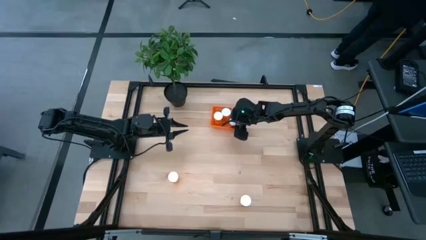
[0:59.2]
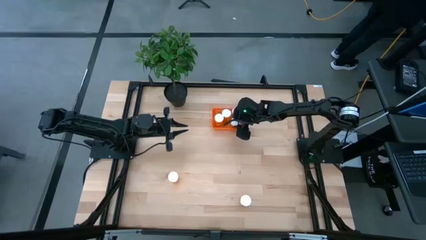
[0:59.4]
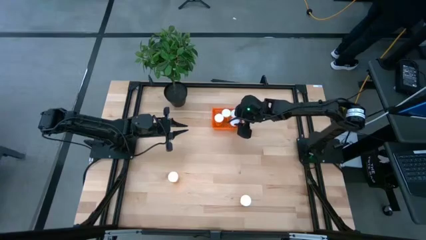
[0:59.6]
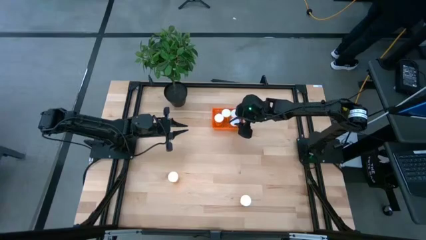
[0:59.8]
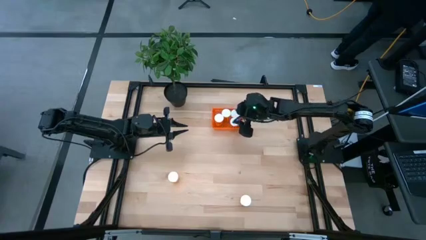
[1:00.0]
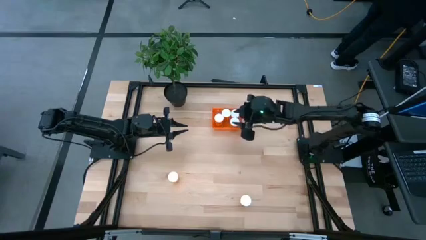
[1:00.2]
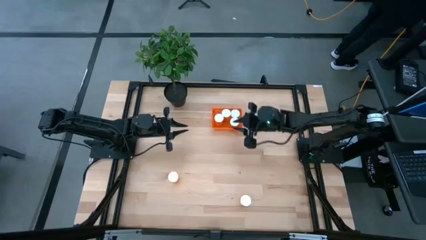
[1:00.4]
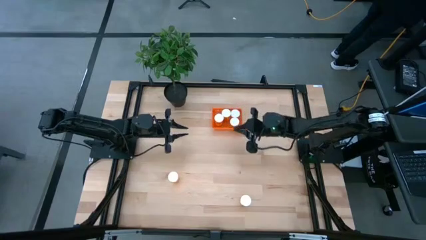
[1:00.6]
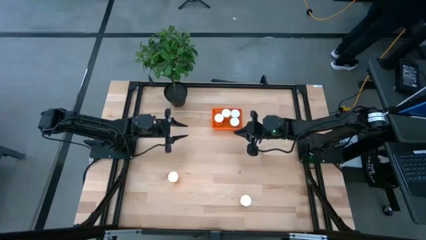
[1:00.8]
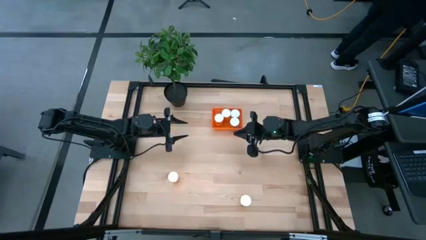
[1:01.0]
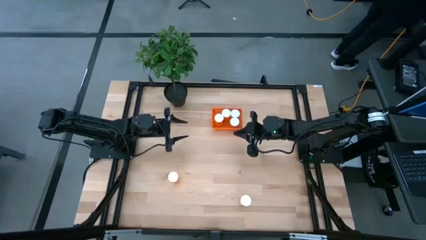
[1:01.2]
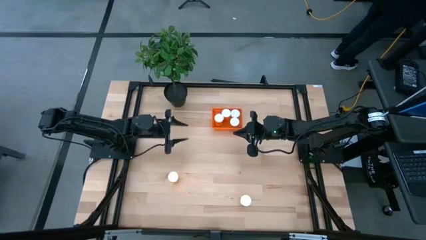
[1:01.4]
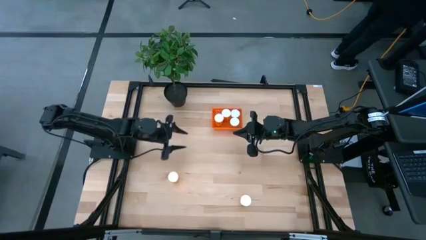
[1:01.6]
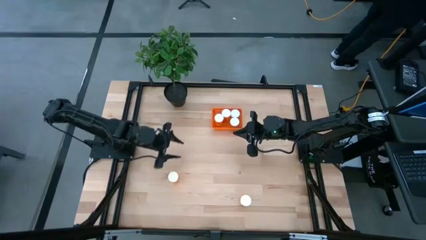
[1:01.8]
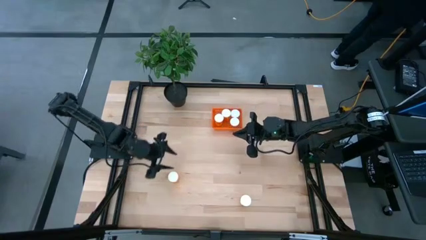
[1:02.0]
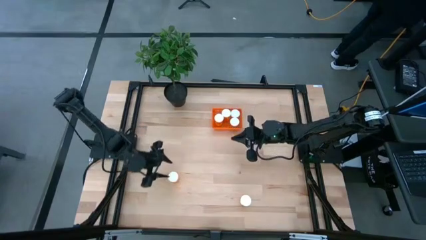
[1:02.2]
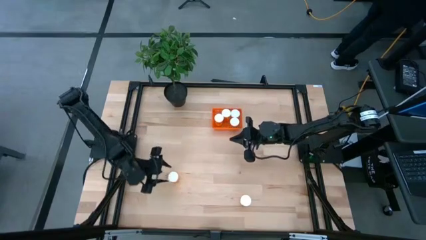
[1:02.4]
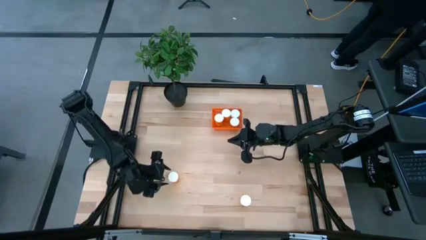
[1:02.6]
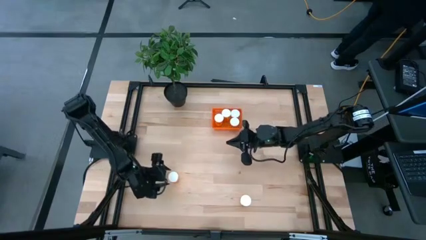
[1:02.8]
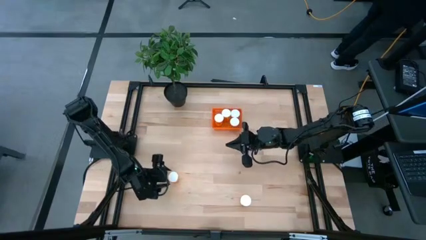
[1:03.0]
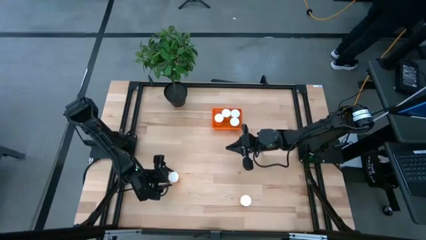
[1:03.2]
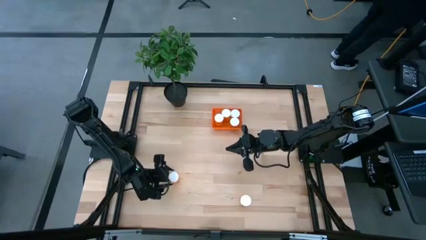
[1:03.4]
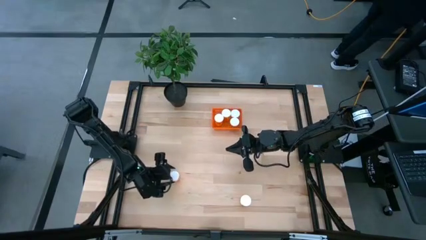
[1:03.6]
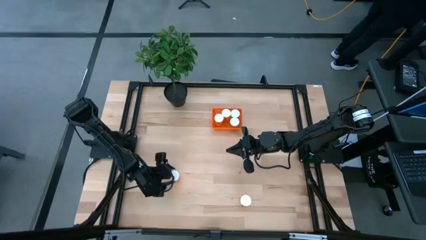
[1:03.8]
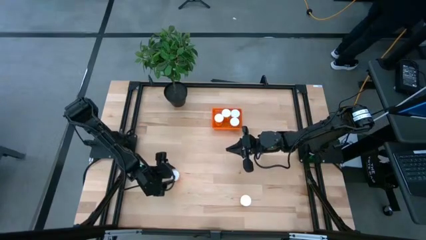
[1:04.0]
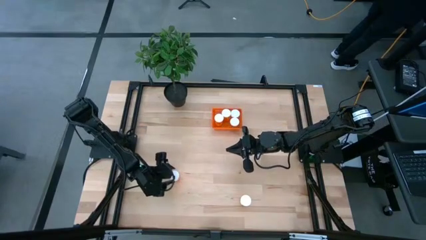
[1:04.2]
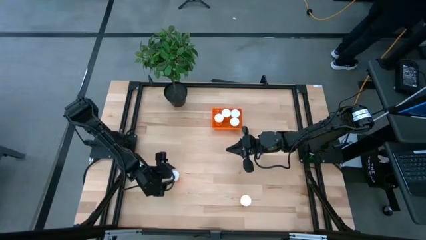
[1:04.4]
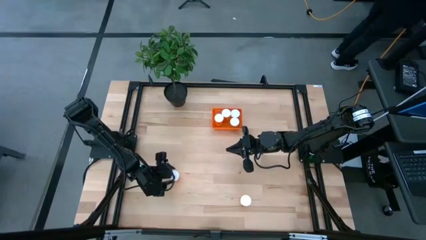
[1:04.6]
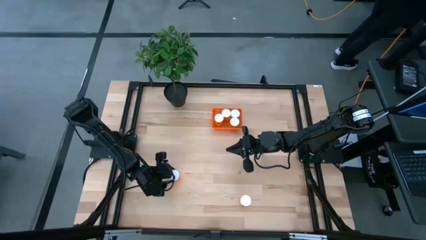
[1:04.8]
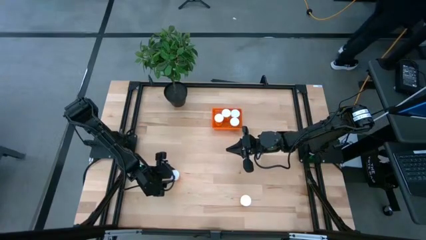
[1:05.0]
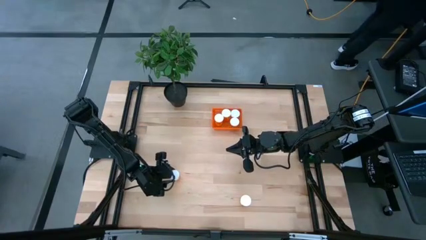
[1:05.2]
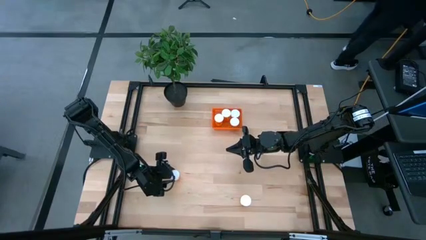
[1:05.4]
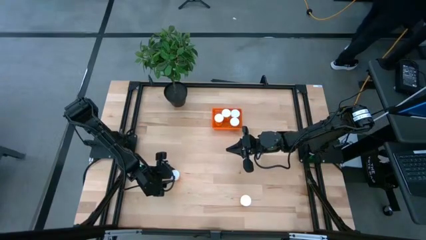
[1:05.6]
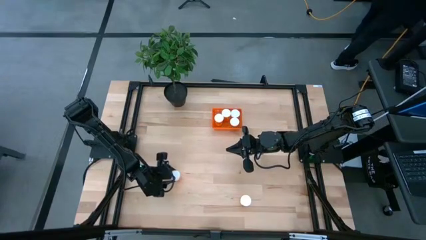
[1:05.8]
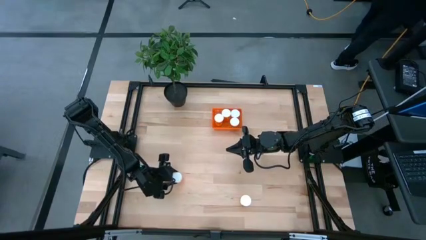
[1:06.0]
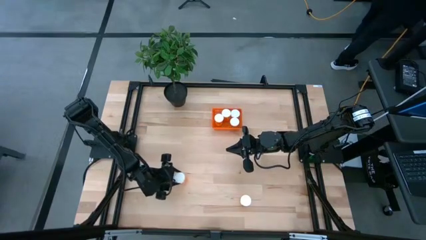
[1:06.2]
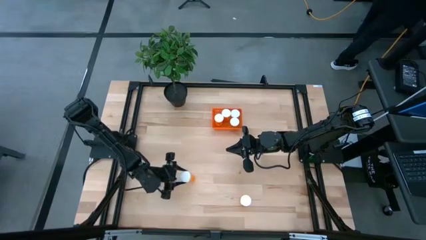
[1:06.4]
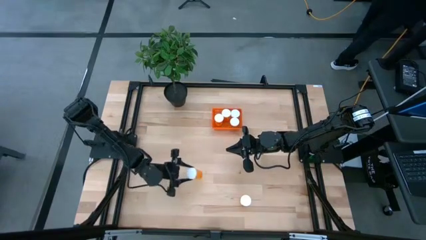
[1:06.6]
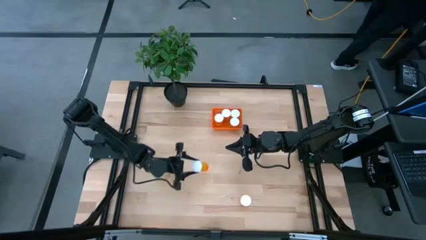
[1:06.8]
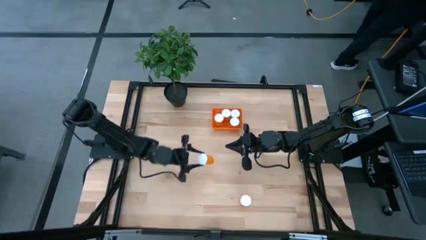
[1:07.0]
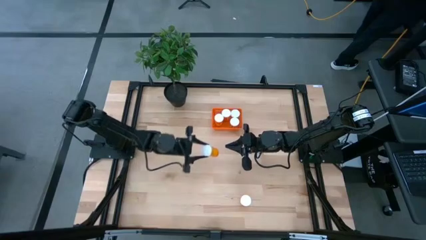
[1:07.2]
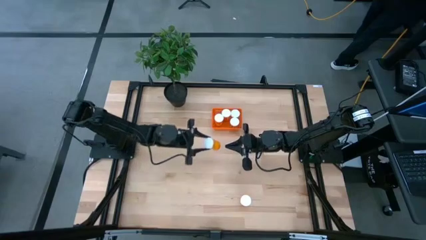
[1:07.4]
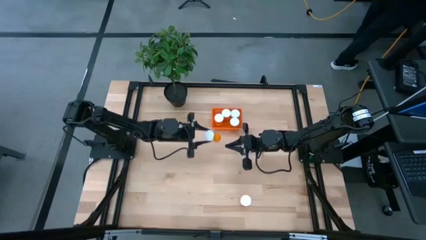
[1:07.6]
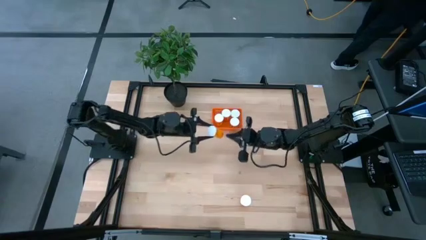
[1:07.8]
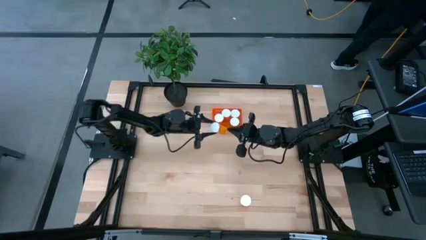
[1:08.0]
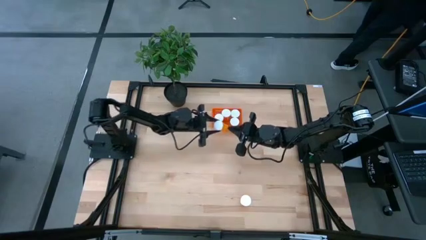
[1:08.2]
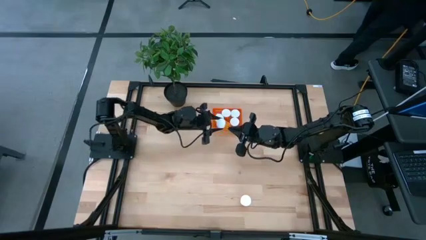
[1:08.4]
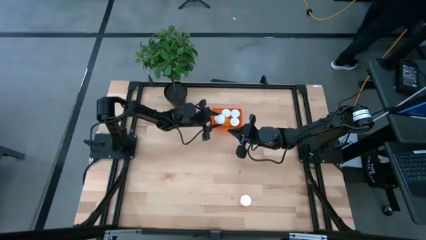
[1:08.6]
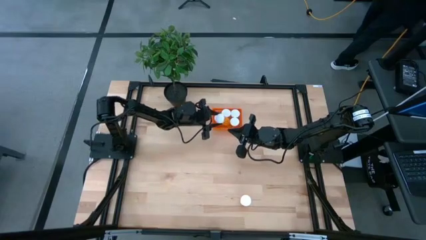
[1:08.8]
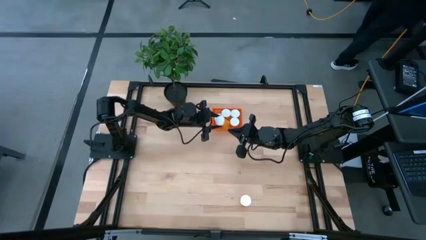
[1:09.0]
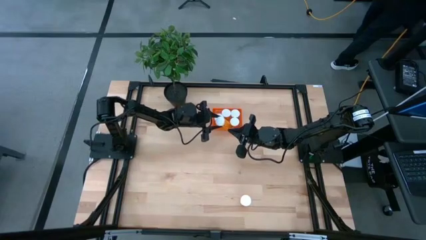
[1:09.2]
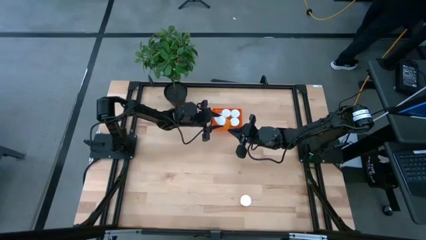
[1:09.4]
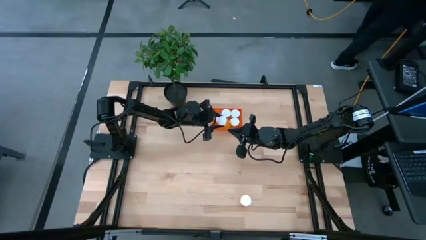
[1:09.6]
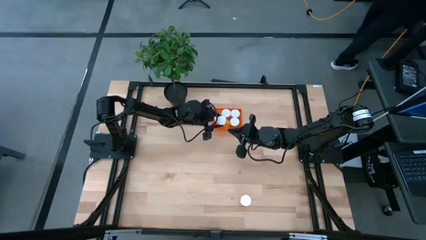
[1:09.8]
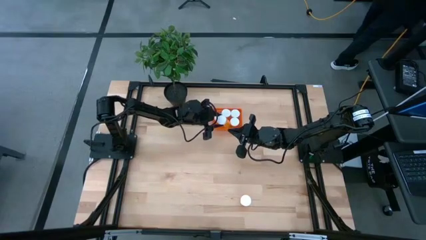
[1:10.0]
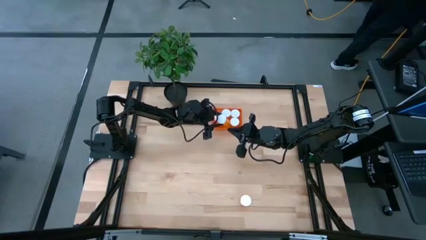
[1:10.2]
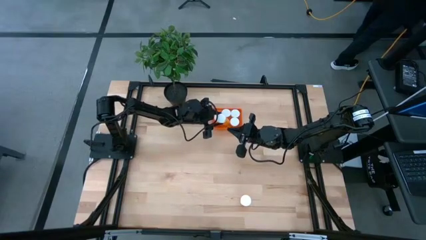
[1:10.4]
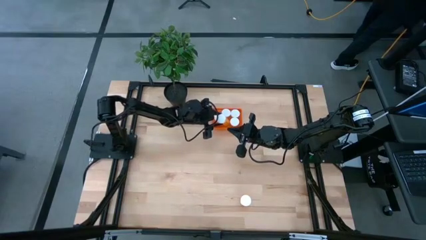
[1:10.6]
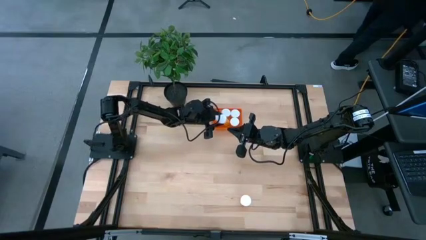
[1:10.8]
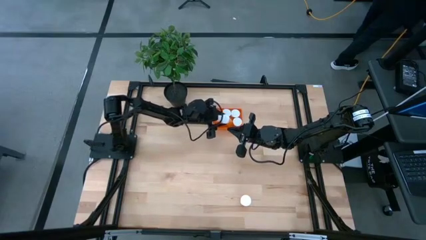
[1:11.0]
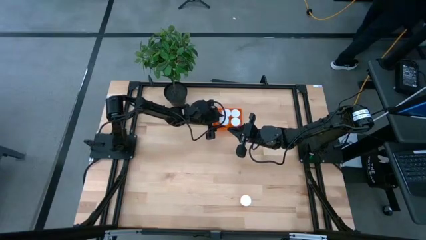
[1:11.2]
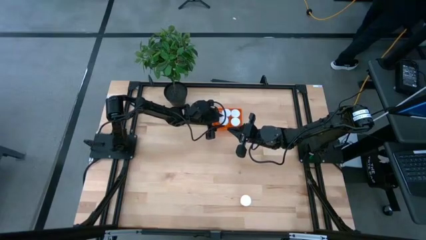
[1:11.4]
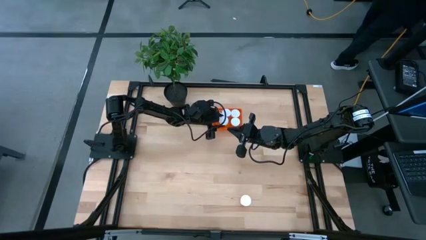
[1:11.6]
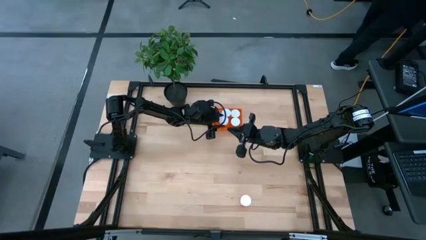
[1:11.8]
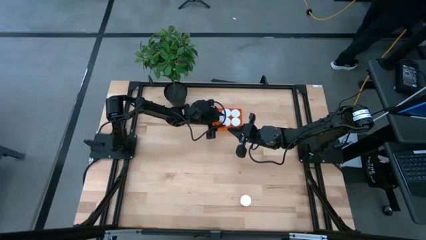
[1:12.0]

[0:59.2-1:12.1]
Task: Pick and place pill bottles into a basket
Put the left orange pill bottle into the orange bin
